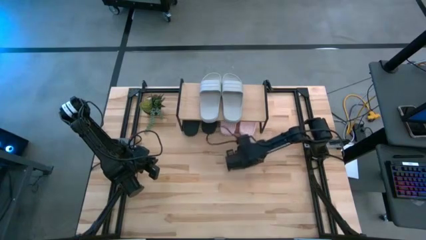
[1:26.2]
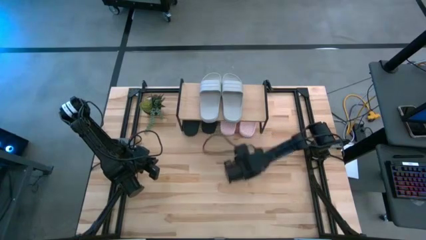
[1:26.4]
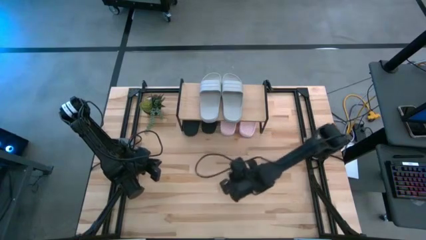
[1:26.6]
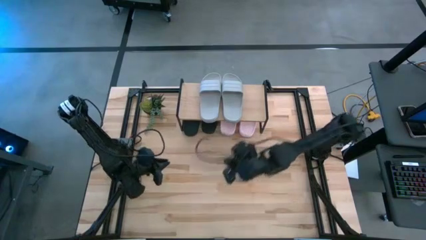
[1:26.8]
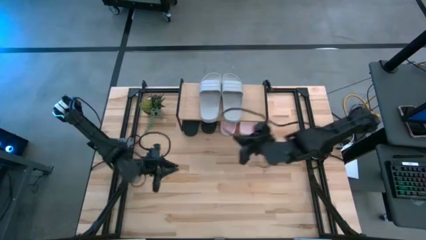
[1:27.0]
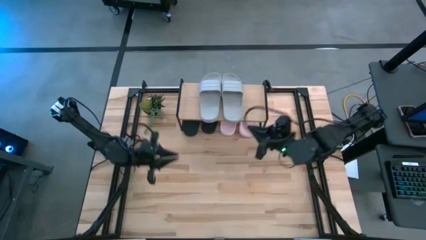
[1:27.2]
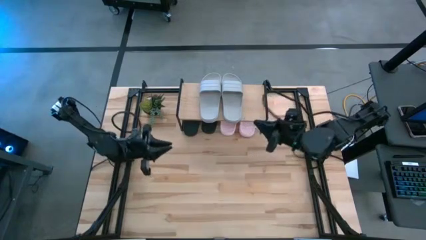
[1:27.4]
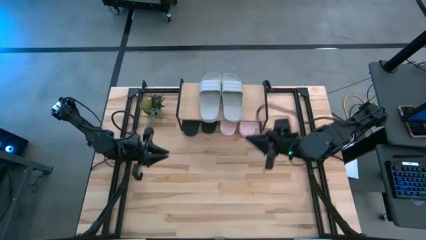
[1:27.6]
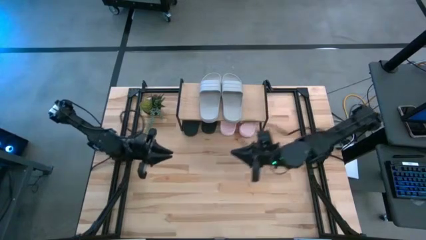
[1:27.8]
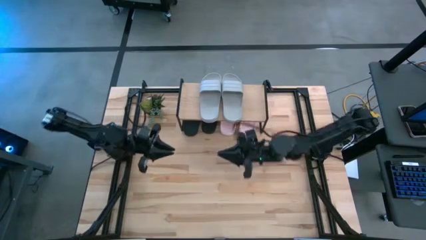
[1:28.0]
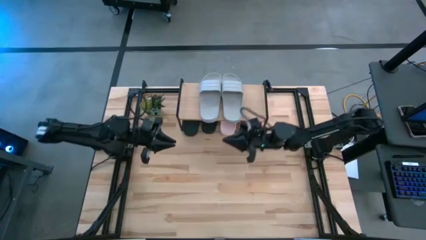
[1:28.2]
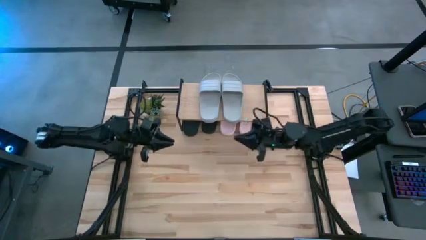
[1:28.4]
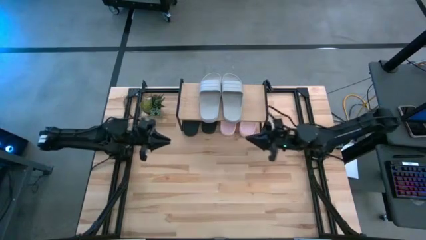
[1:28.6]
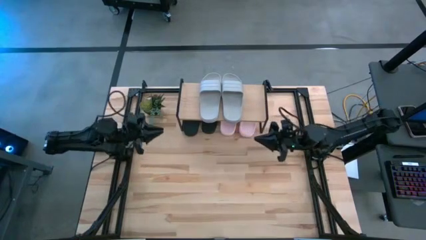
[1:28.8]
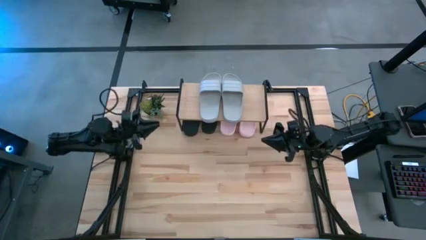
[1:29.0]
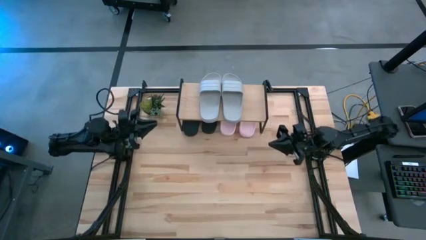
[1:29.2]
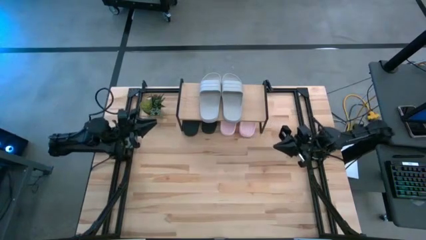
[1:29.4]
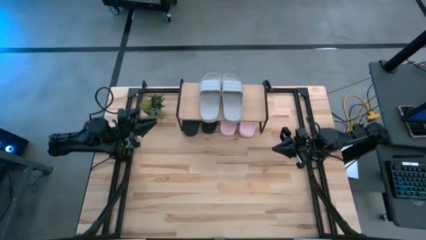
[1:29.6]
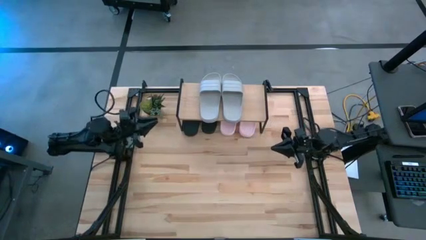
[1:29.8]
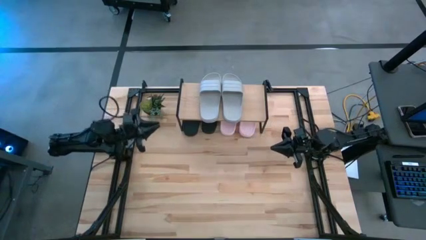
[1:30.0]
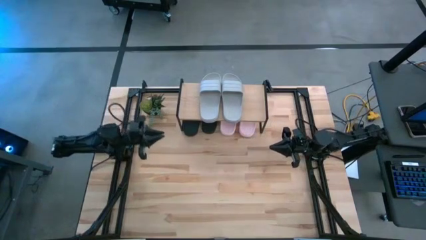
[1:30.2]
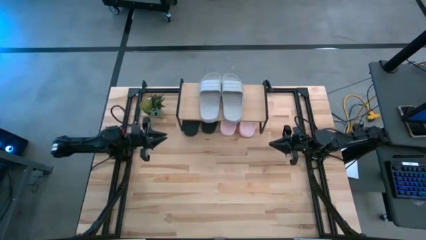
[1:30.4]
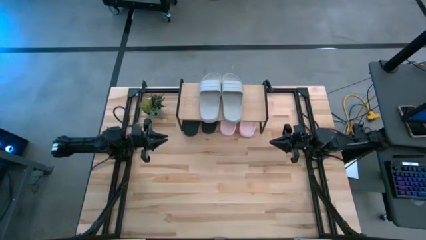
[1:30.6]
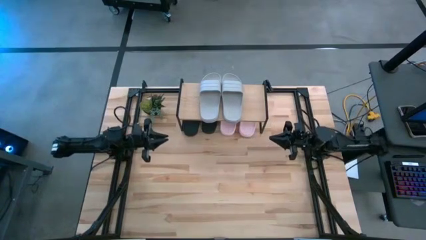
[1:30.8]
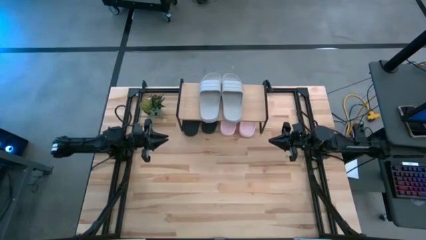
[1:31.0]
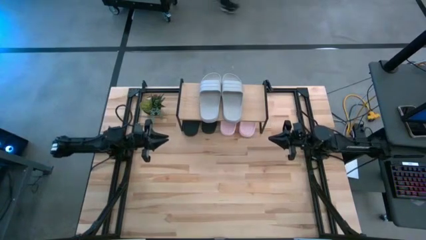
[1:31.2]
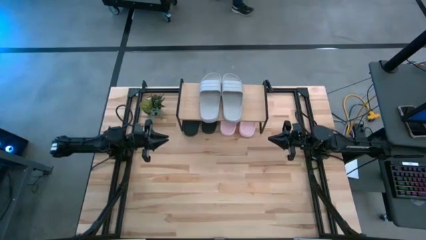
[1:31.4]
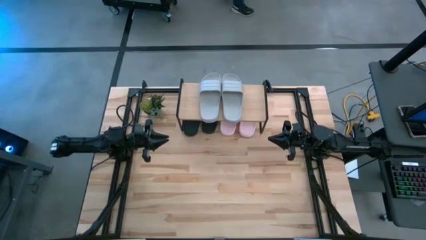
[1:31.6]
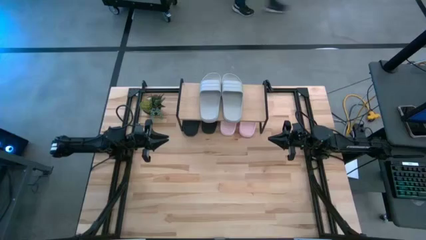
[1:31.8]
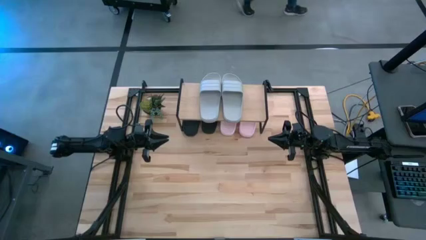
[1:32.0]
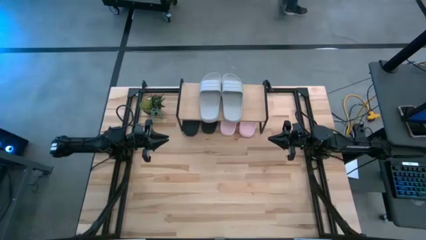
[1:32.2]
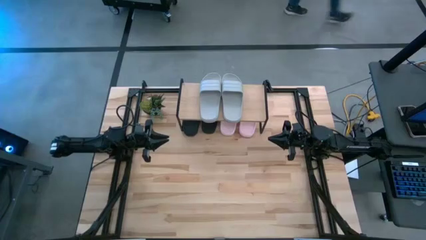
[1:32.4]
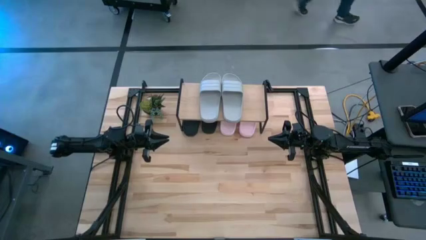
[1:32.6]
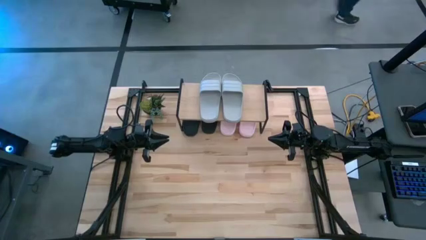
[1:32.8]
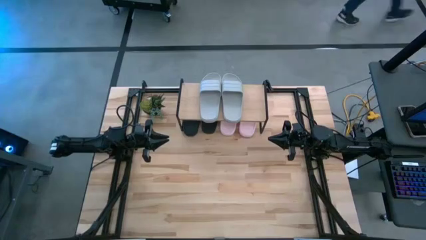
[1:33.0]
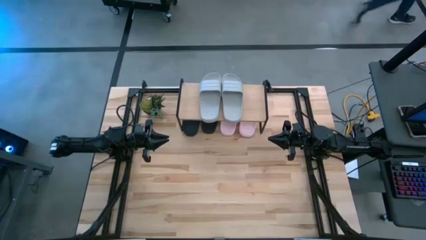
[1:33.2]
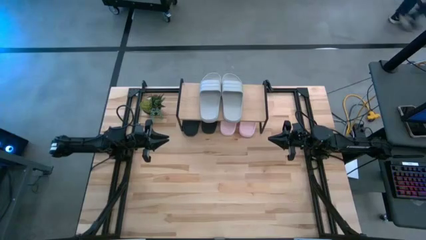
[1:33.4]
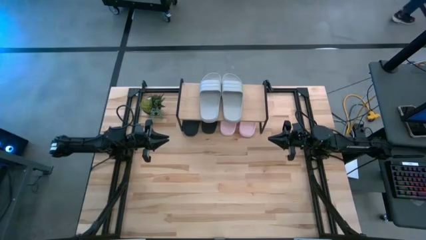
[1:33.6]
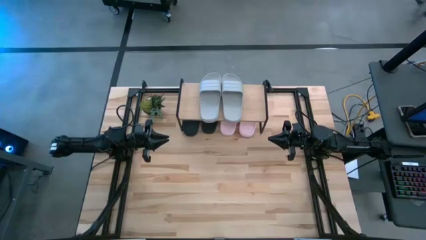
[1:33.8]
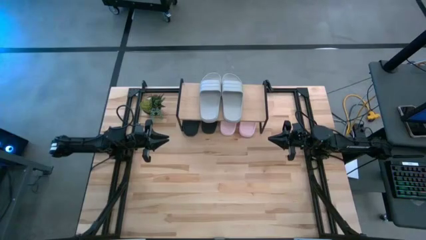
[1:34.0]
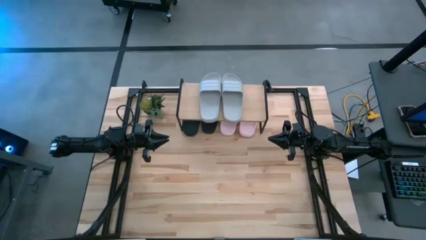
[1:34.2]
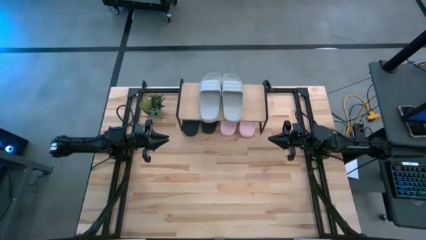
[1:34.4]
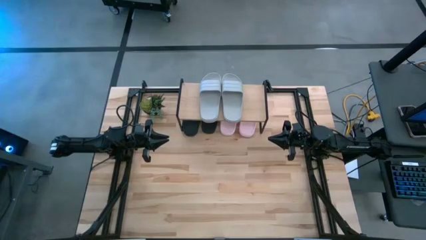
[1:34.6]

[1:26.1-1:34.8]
Task: Pick and place slides into the shelf
Return to Home Position

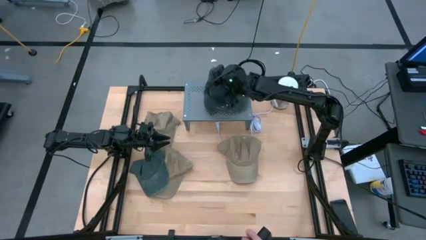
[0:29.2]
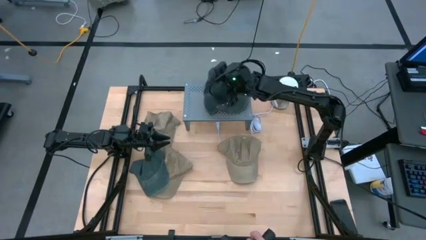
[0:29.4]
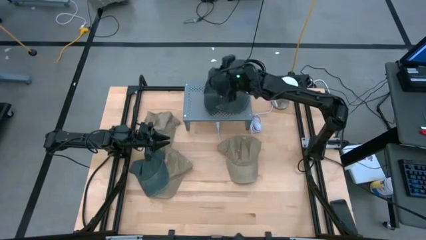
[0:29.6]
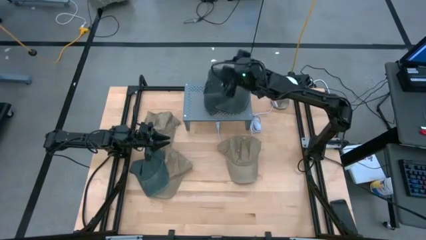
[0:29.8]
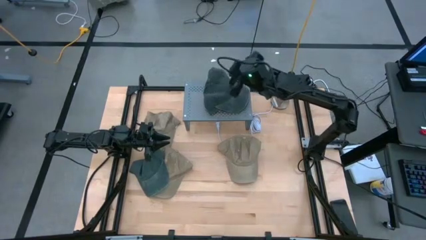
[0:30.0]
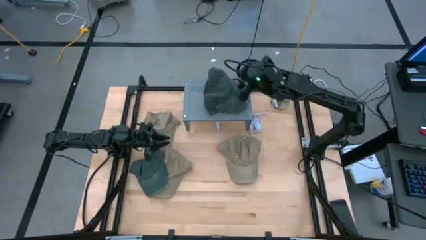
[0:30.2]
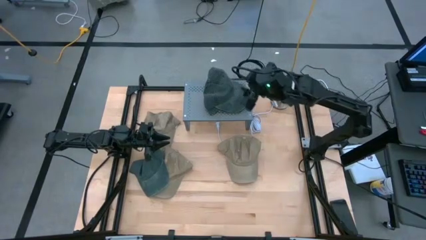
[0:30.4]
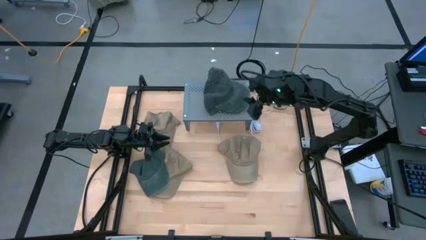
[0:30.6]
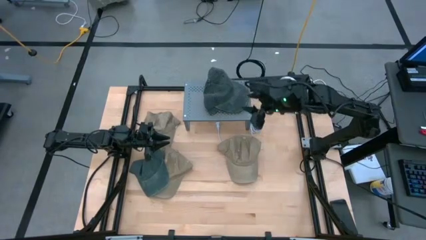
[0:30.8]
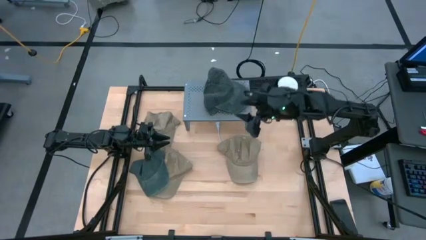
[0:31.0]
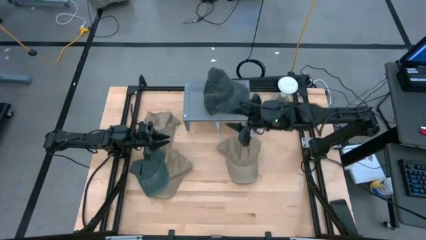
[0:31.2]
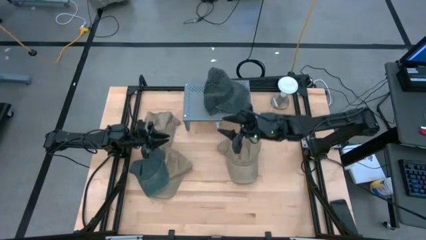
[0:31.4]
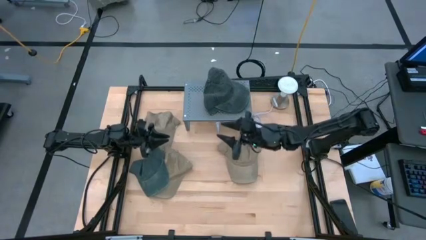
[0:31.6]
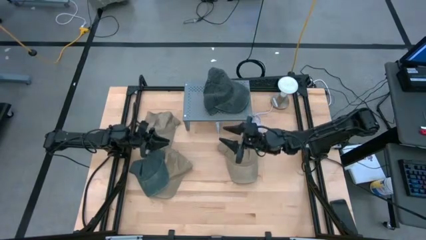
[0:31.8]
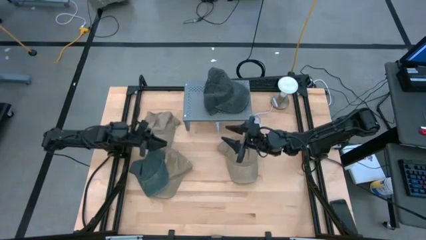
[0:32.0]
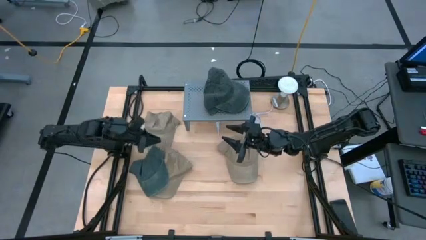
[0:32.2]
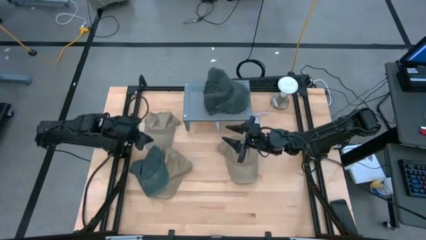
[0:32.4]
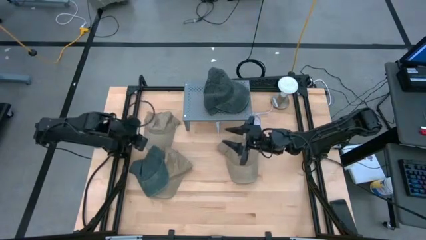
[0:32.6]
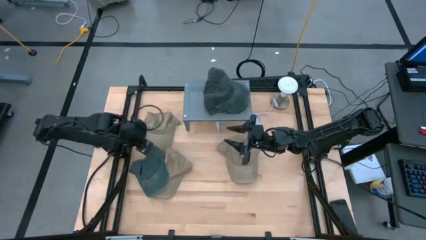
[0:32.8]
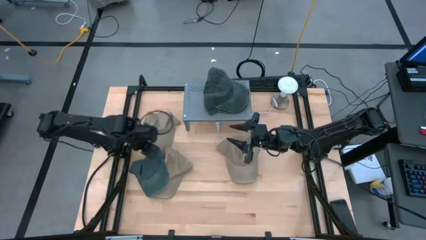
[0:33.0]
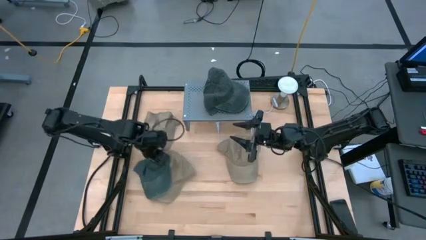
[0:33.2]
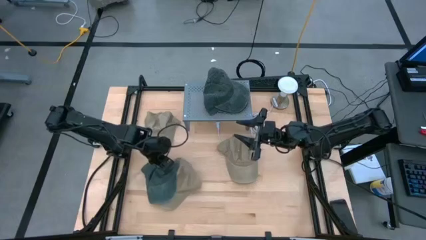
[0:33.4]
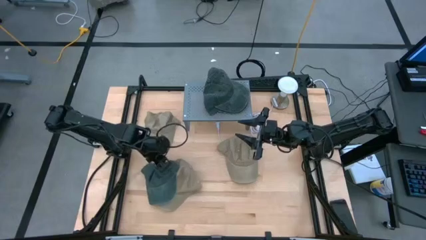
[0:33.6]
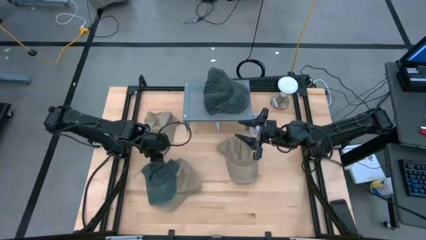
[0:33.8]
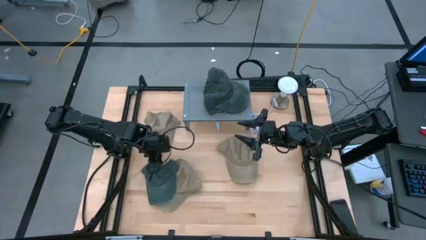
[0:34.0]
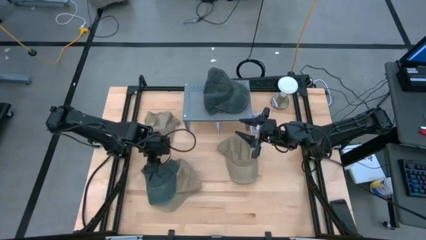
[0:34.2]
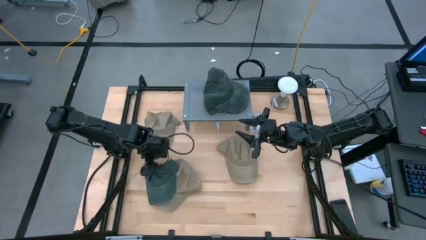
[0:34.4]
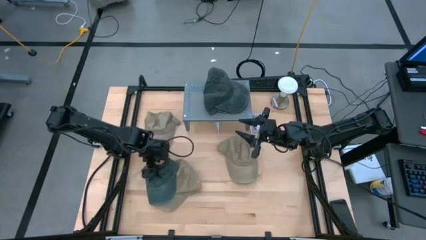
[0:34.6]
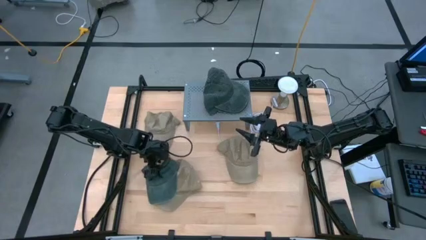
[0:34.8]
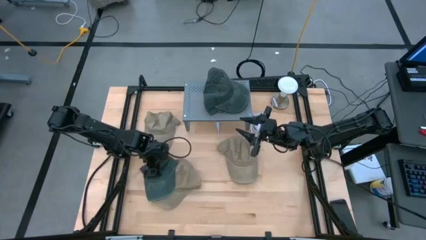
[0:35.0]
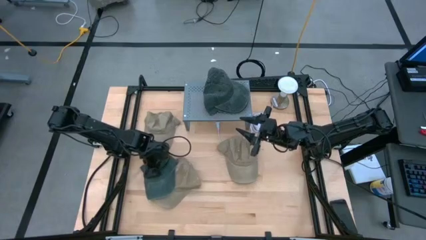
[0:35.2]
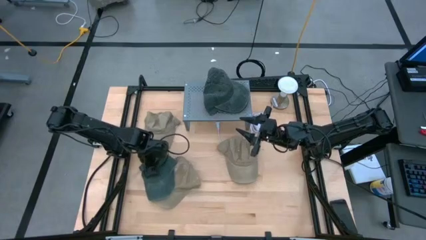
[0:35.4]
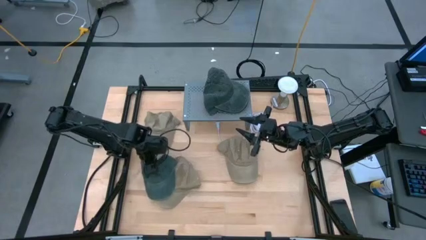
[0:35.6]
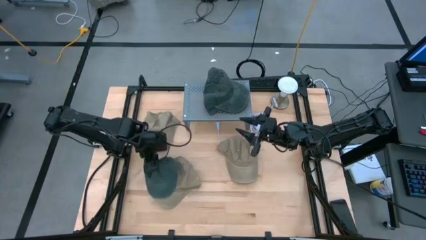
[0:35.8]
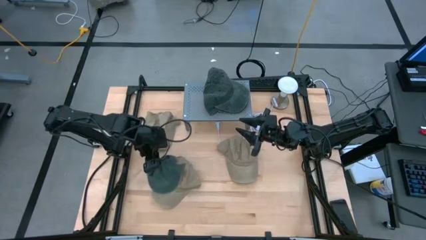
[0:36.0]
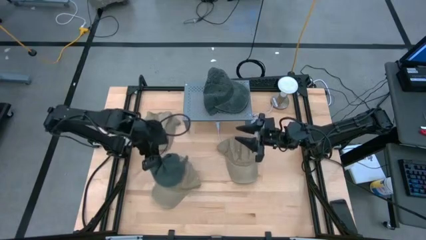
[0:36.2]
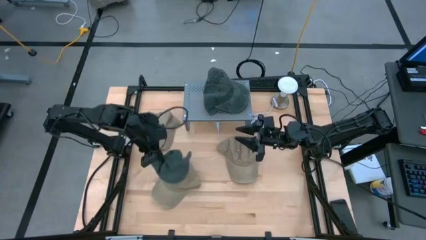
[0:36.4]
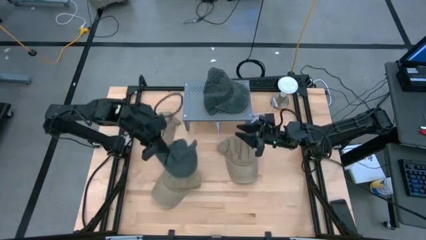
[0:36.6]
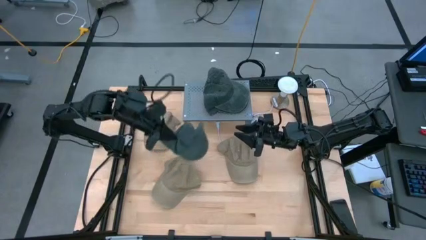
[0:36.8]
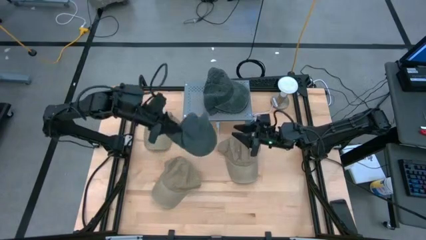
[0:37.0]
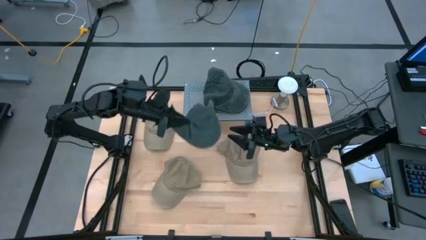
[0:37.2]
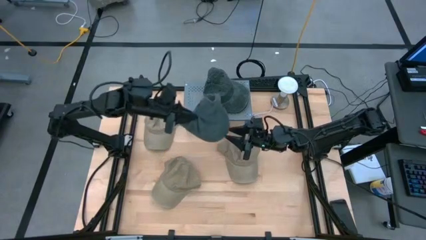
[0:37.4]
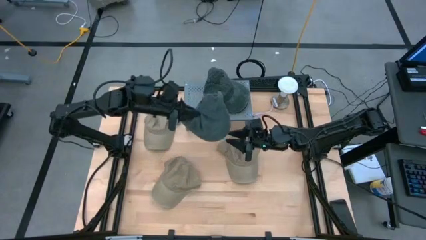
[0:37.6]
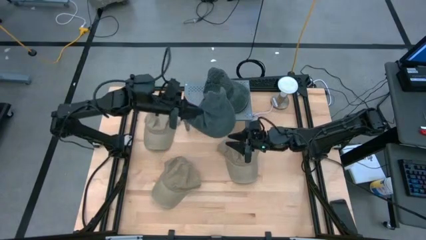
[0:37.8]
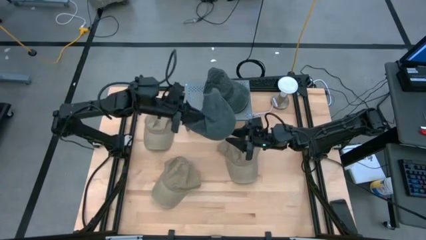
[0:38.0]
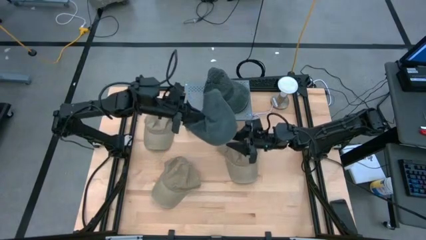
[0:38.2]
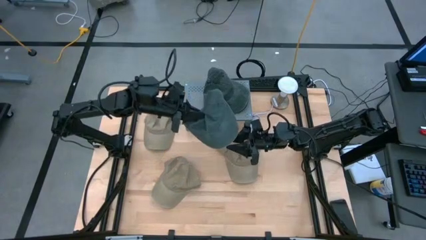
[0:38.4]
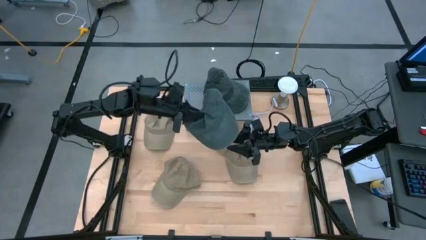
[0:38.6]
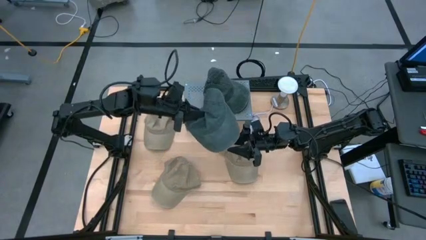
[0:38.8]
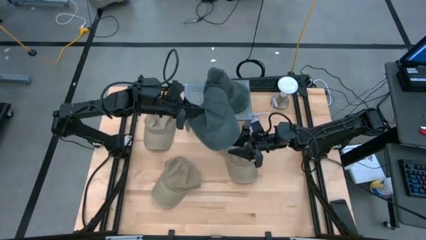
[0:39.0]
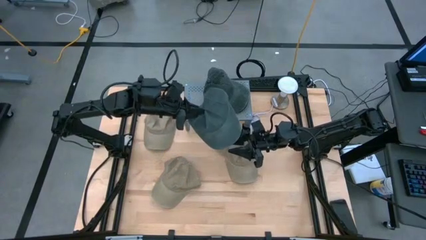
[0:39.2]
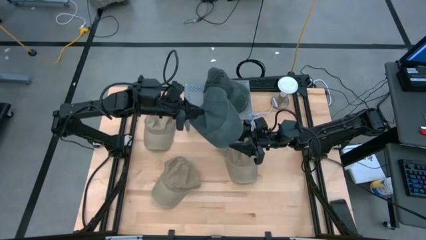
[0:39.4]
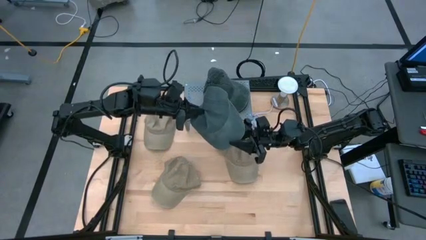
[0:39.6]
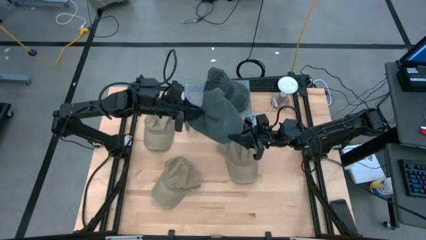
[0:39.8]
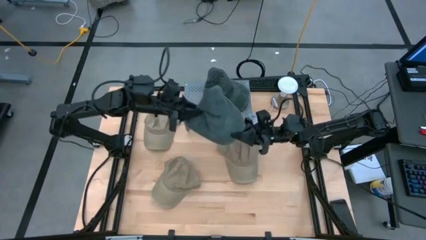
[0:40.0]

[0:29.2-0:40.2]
Task: Pick & Place hat
Stack the black cap on top of the black caps on the shelf
